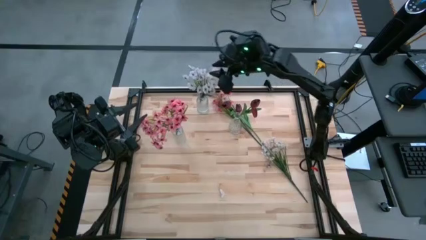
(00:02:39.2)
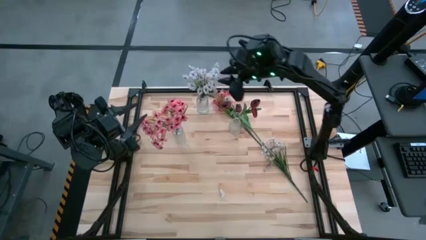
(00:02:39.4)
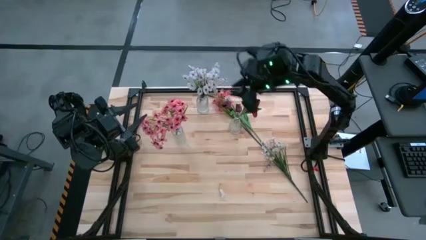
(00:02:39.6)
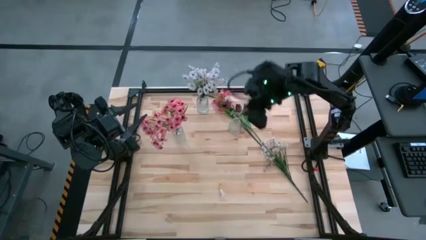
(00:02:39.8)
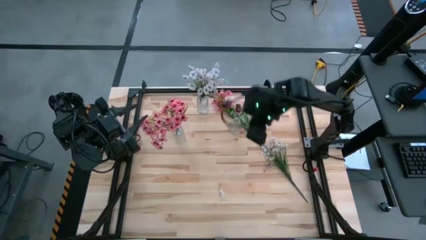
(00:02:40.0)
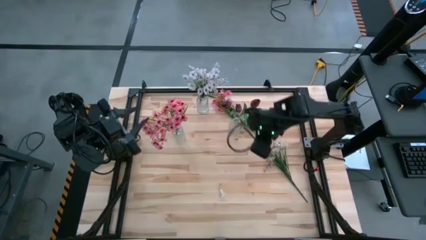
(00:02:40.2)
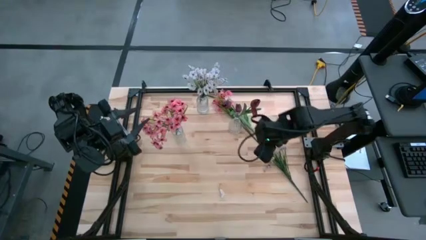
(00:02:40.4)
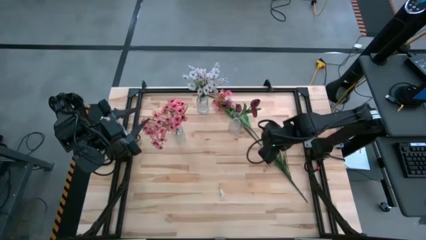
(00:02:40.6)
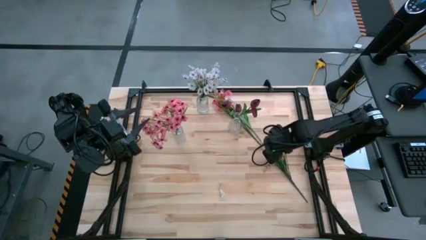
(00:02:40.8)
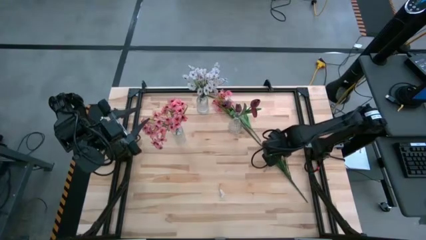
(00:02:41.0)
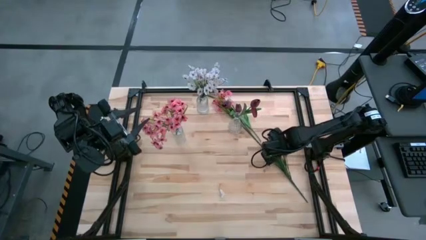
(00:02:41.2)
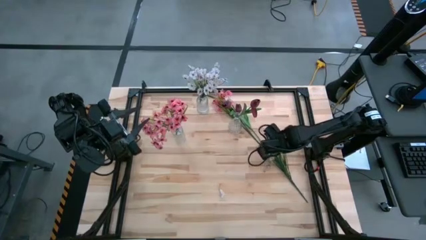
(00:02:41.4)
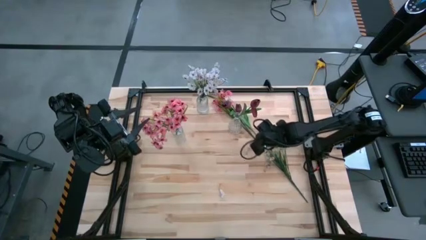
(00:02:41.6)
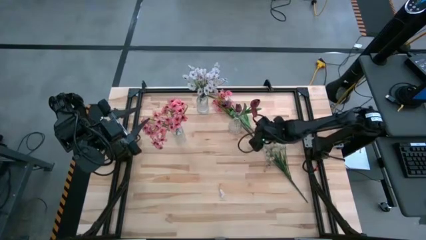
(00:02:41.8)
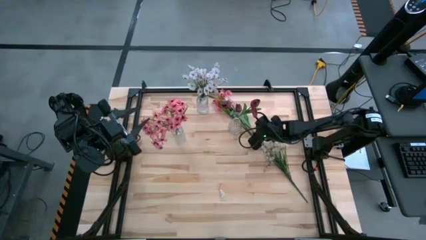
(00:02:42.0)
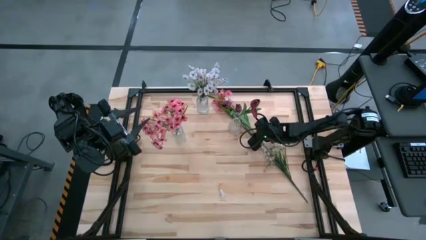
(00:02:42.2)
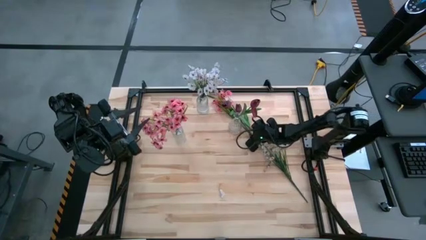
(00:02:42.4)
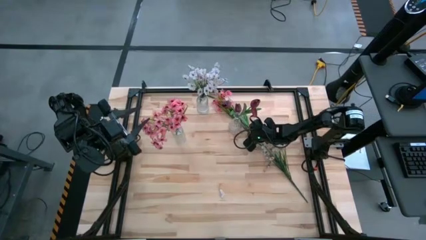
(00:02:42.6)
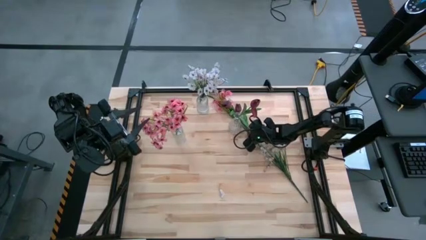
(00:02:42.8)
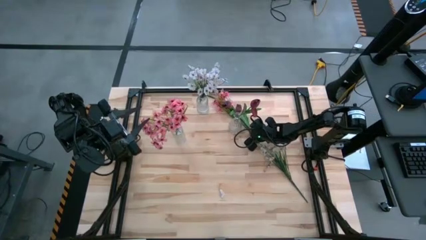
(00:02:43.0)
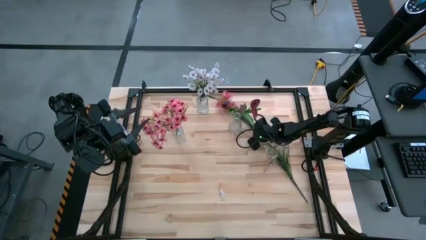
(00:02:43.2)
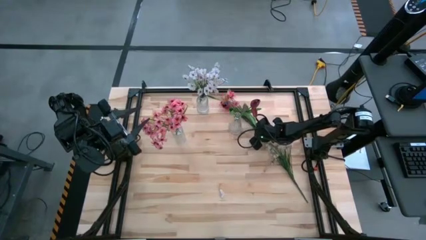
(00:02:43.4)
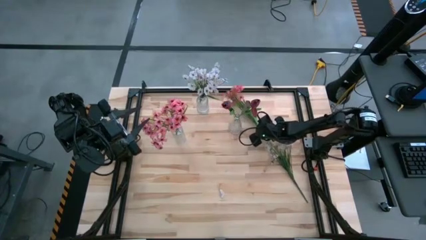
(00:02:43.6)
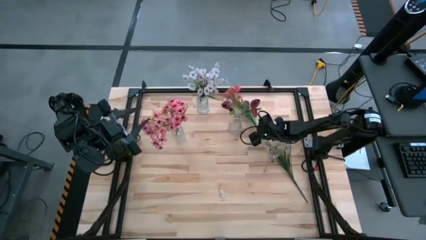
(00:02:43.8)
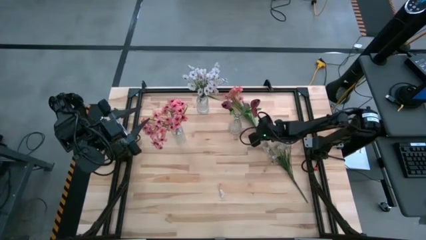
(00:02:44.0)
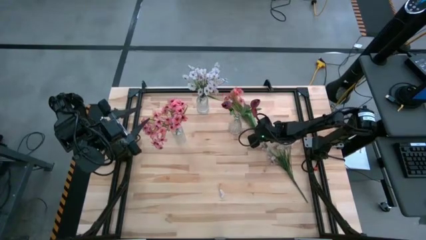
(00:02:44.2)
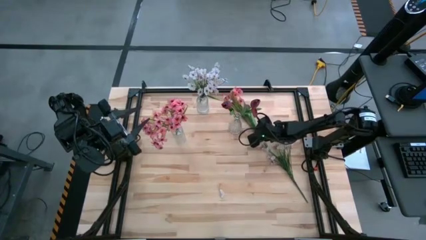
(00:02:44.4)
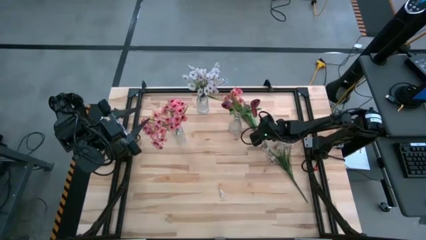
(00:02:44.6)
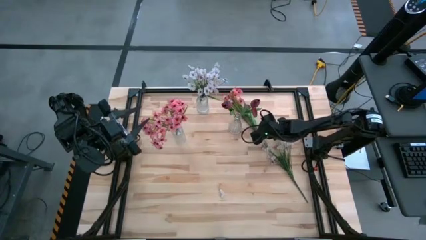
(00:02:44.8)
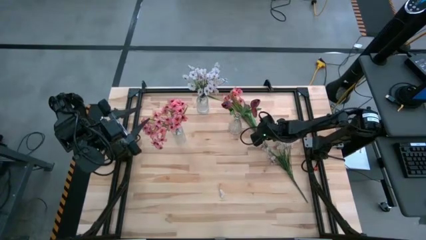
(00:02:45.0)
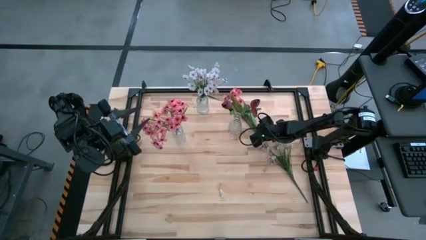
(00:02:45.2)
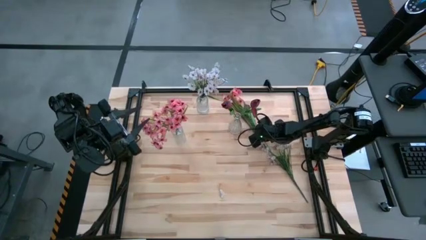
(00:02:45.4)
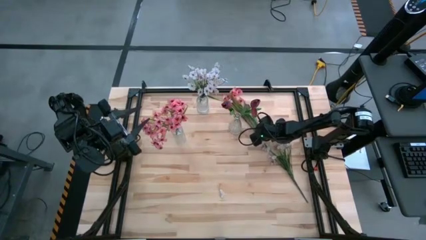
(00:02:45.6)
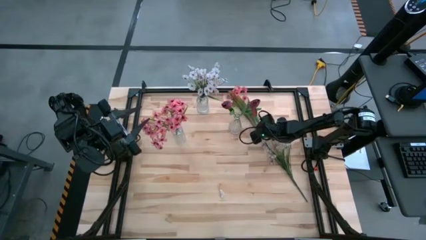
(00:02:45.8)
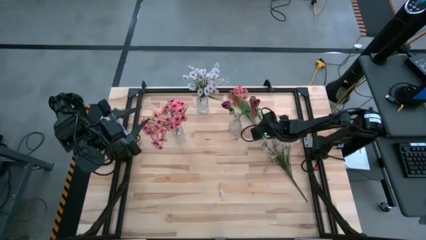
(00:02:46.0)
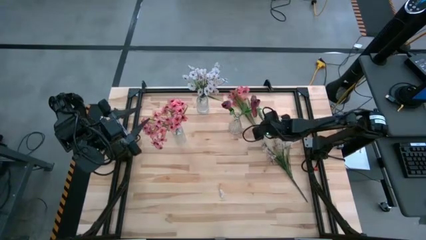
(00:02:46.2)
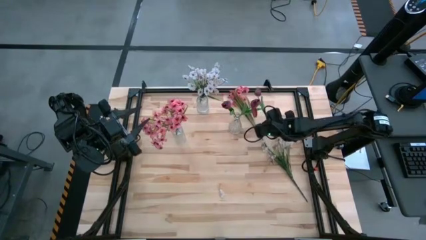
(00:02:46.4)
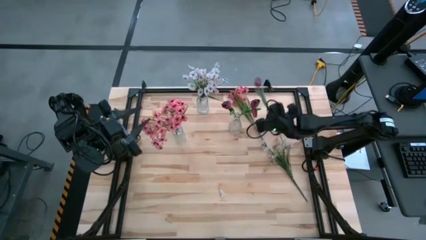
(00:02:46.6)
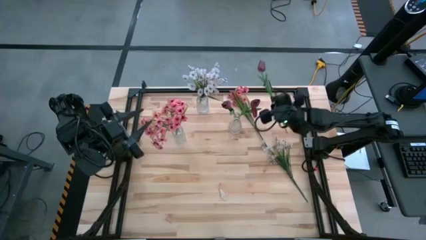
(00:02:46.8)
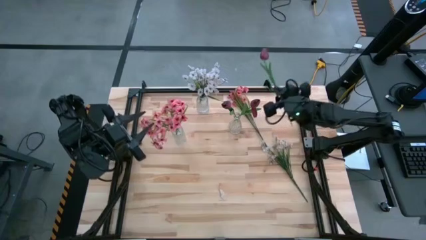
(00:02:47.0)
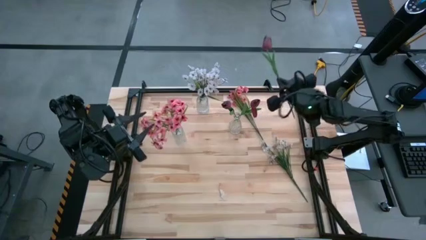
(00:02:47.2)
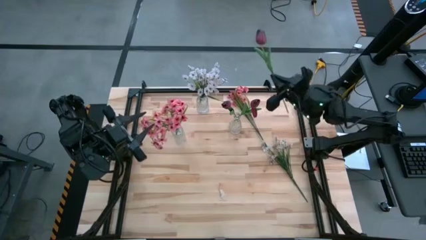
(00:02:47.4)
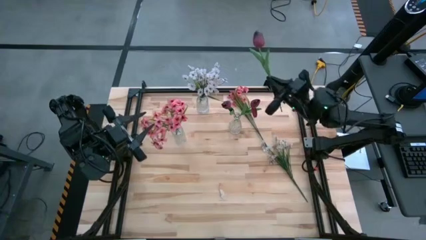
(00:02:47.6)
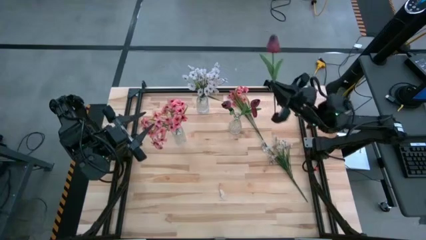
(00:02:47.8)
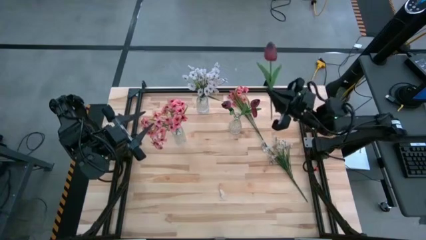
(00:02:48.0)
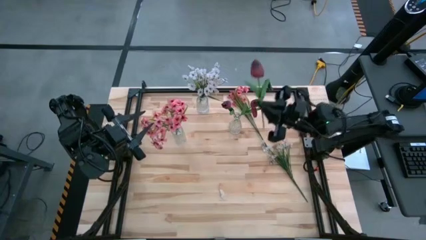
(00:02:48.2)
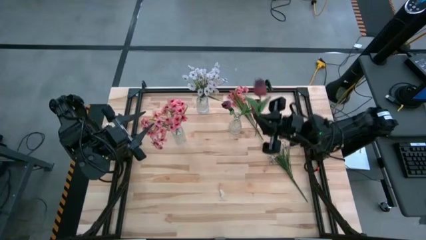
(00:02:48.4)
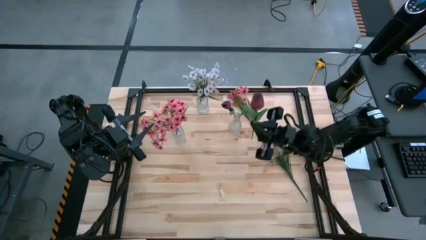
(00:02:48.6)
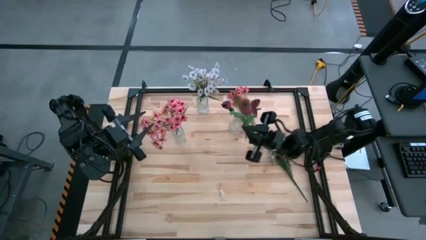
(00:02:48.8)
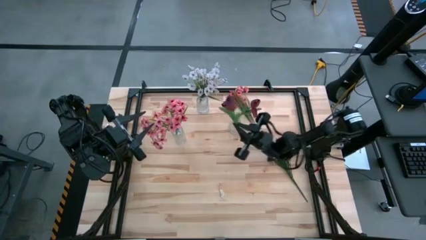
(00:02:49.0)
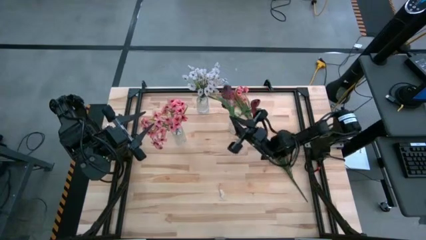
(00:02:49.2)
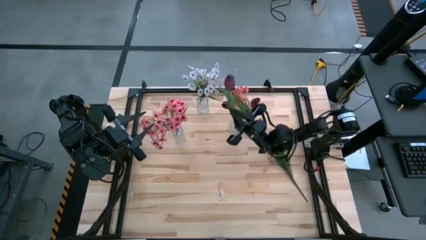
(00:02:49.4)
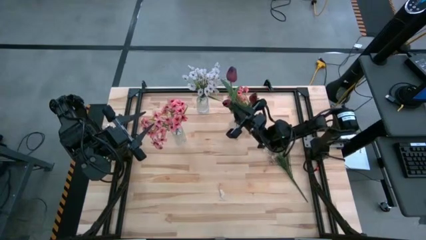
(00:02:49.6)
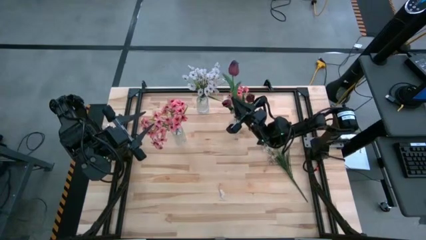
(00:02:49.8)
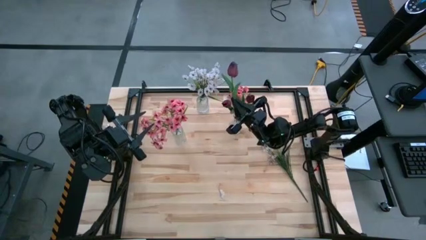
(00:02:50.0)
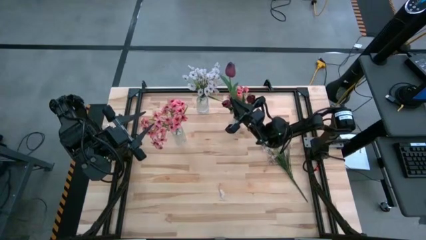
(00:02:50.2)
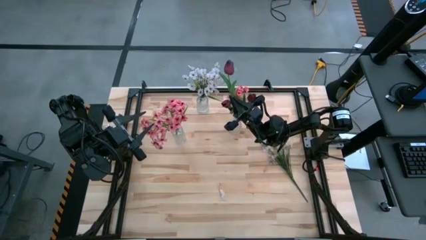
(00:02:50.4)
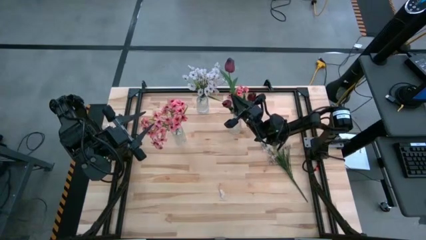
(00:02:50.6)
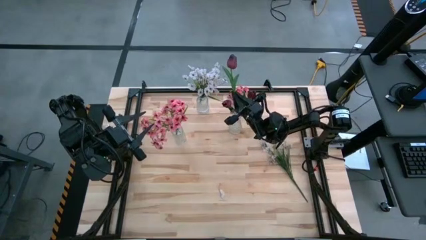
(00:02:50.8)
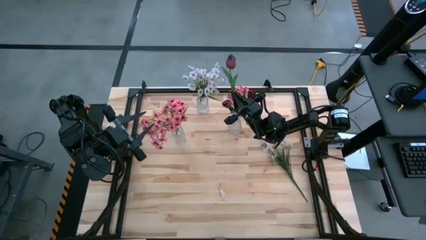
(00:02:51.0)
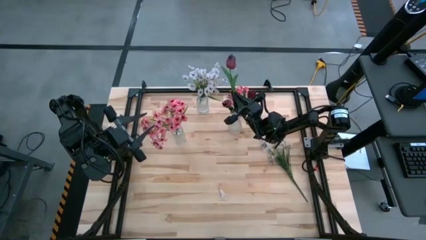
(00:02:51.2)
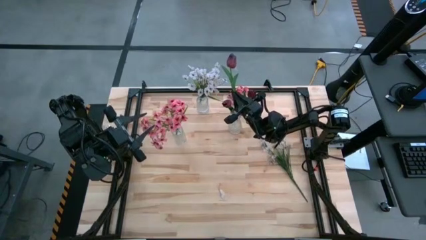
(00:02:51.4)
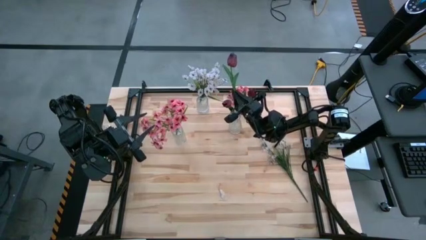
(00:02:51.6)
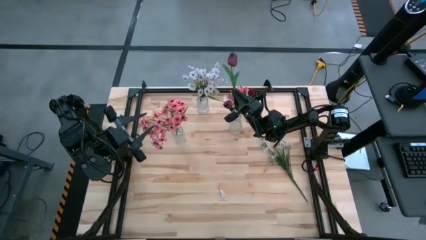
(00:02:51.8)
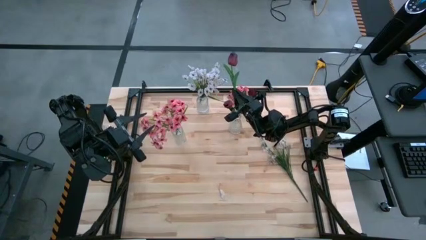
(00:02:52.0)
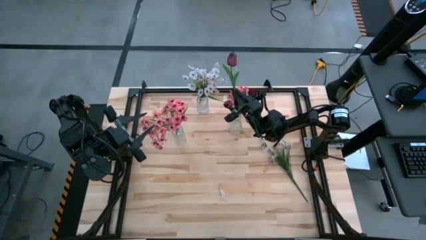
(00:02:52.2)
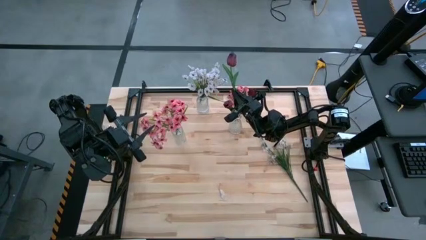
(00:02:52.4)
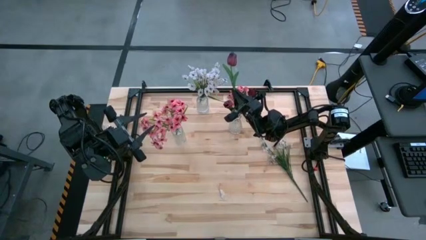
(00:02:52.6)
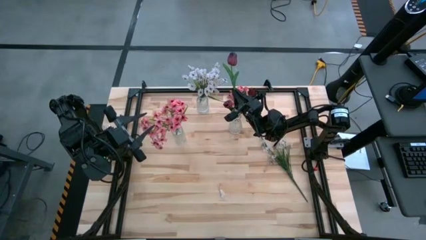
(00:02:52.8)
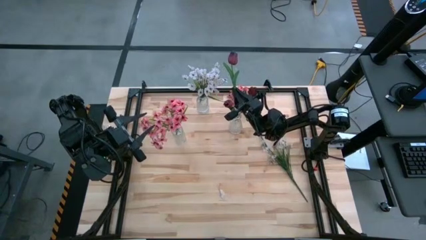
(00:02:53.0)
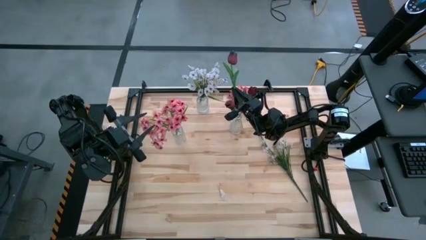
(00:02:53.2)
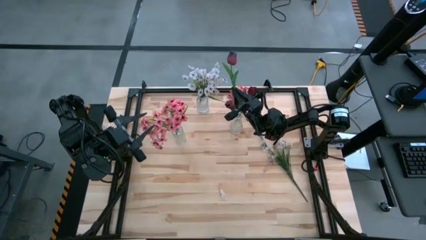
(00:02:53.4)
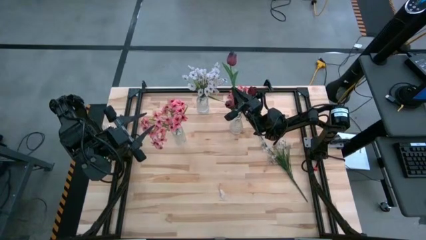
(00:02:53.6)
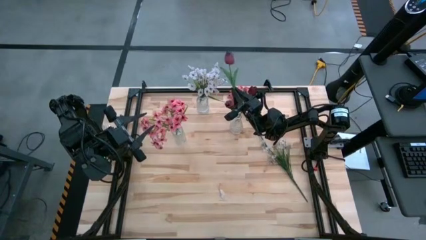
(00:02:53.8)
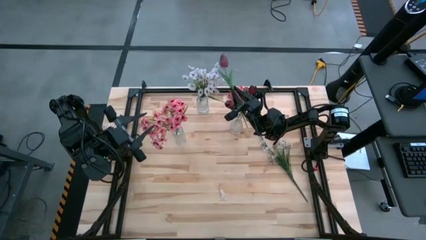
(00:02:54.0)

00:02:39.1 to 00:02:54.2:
Task: Sort flowers into vase by color
Put the red tulip into the bottom right transparent vase
